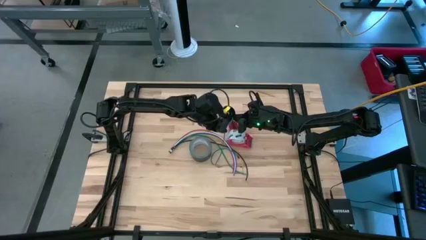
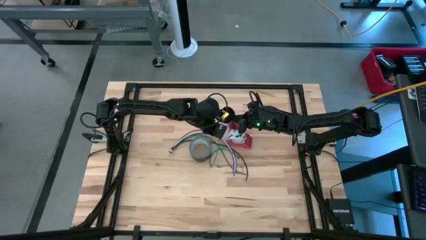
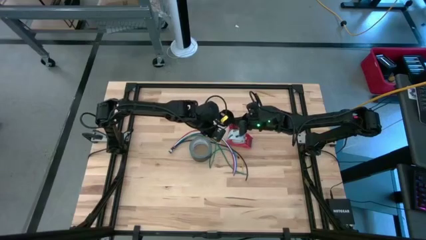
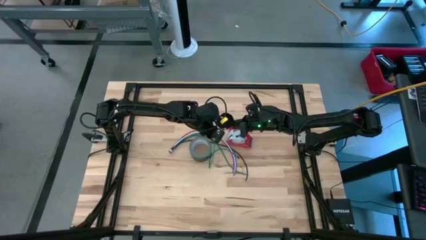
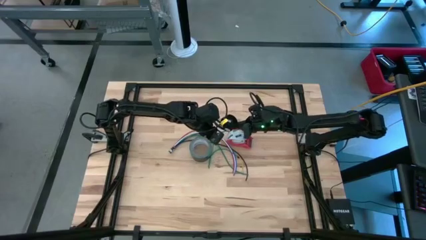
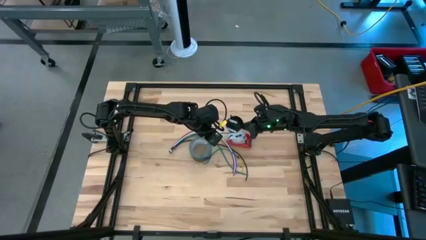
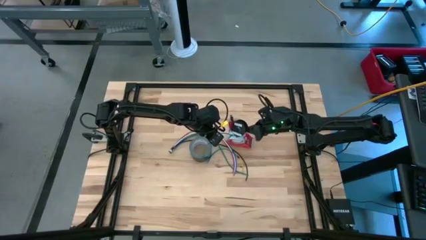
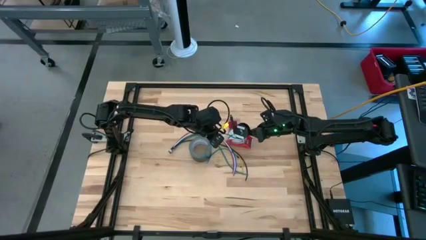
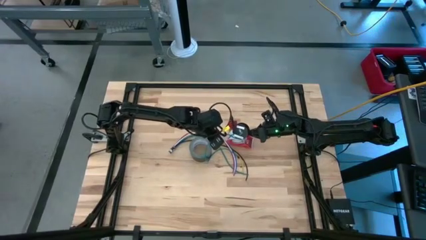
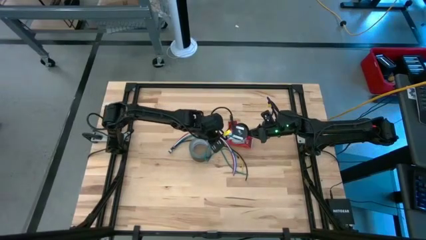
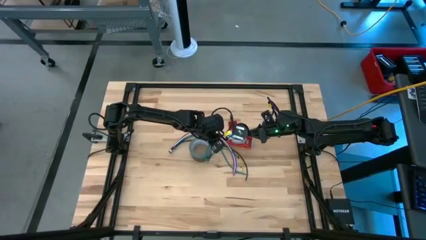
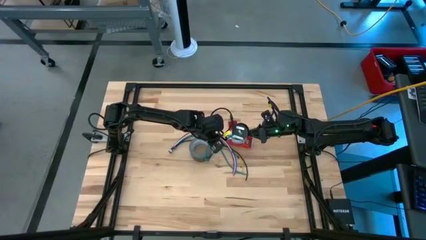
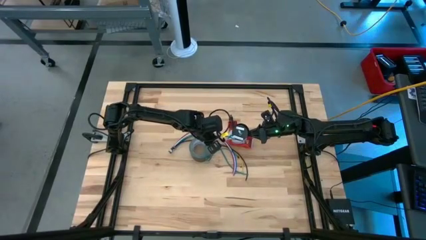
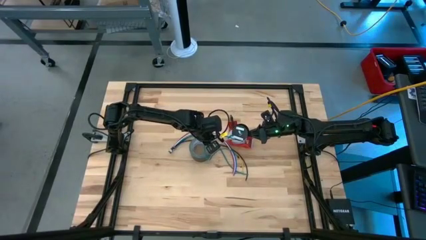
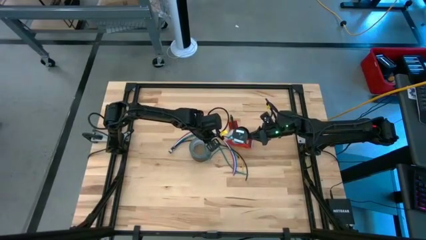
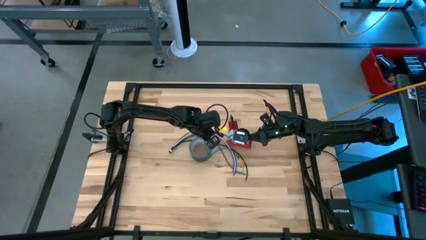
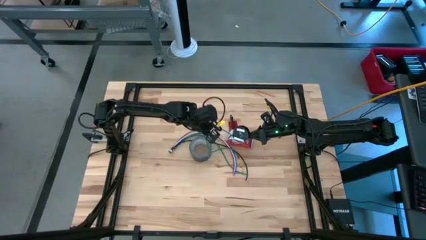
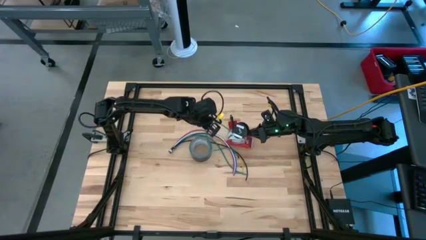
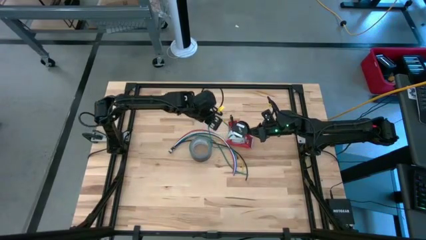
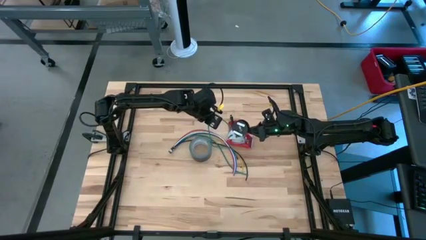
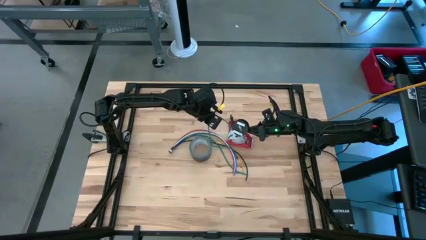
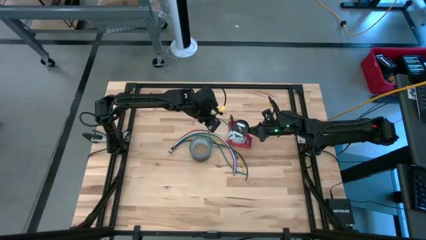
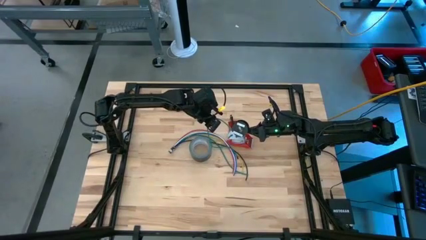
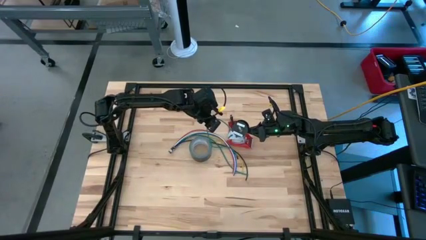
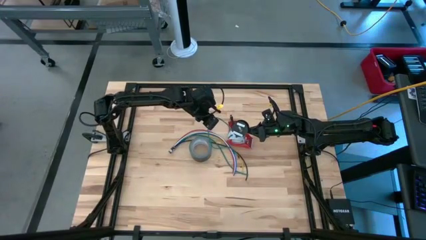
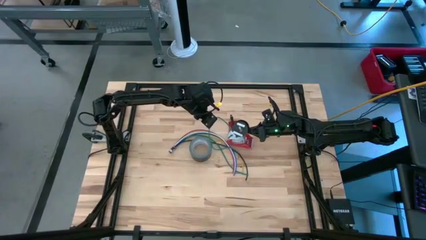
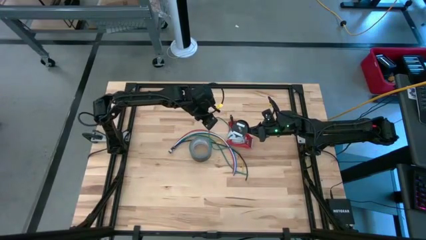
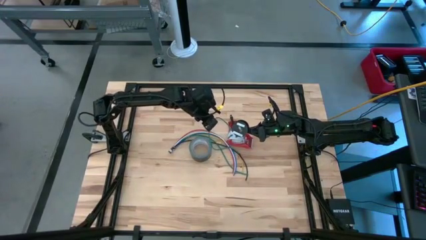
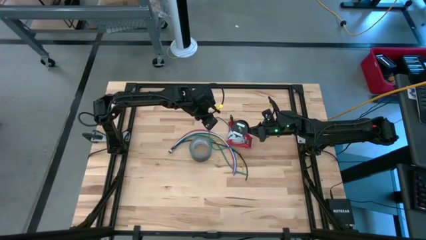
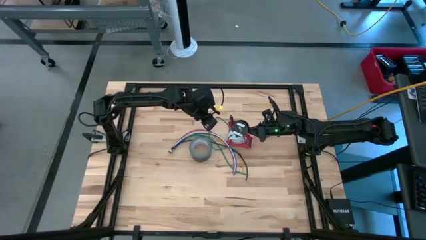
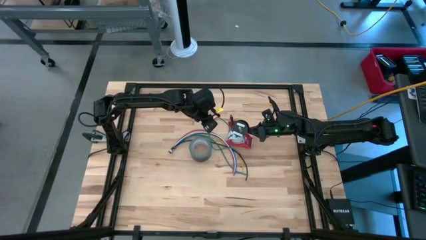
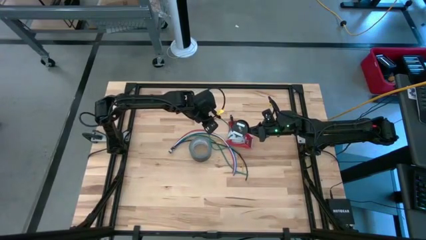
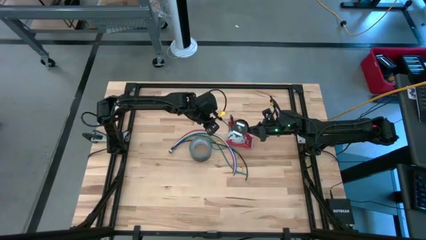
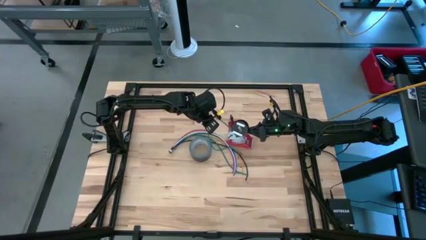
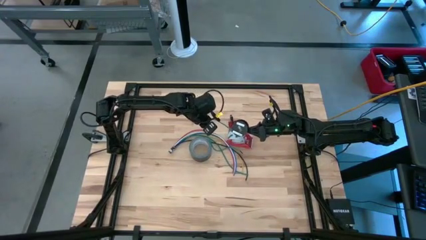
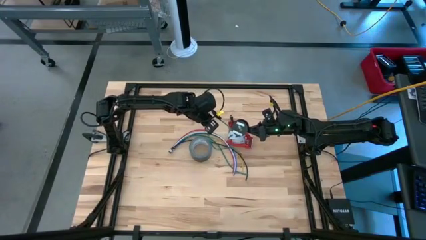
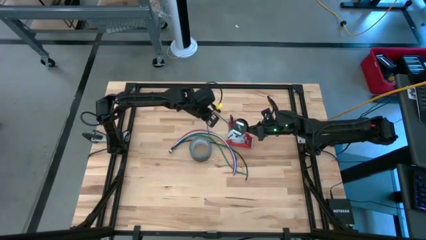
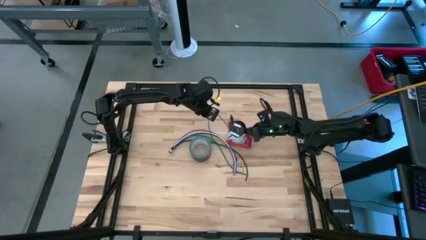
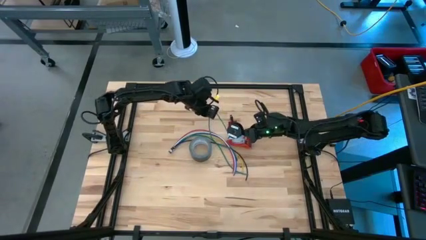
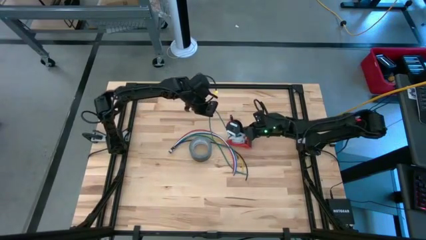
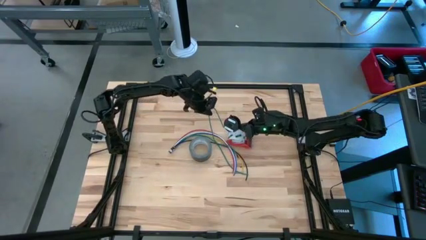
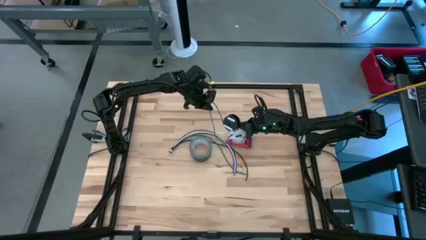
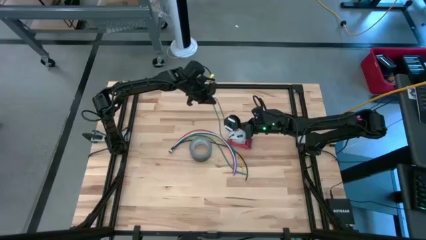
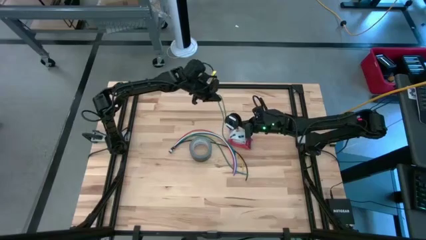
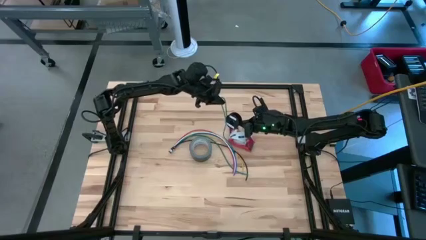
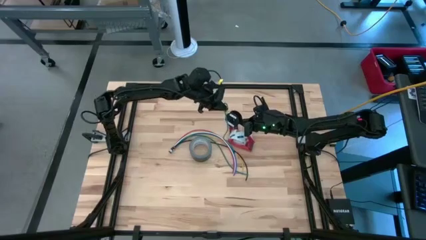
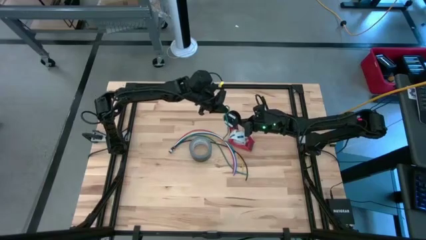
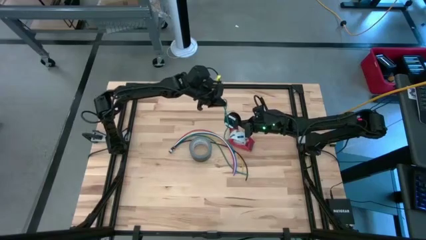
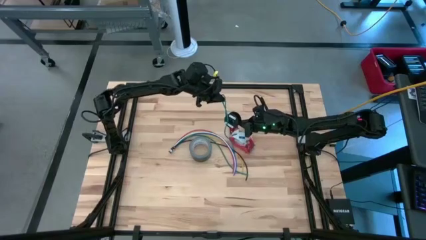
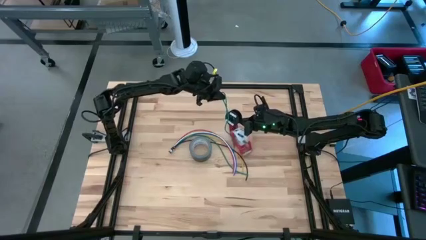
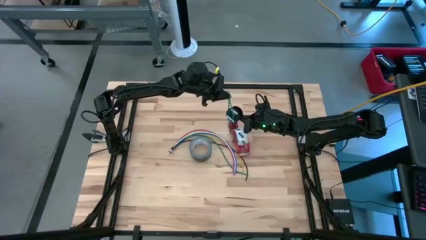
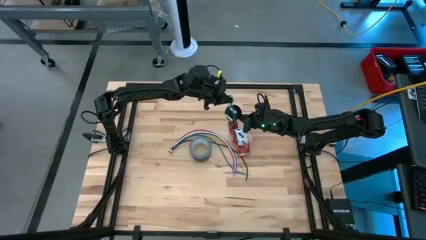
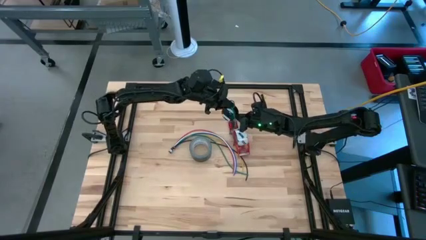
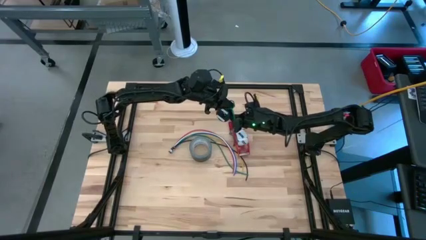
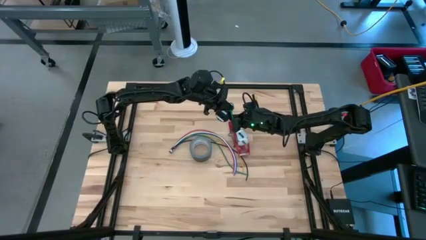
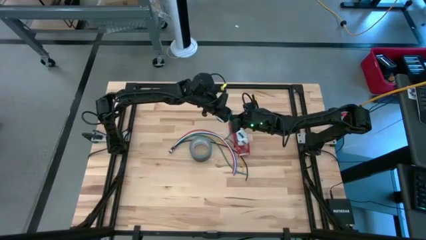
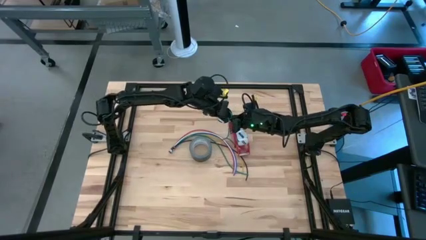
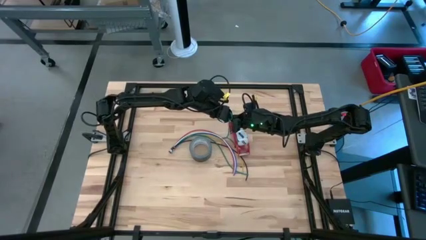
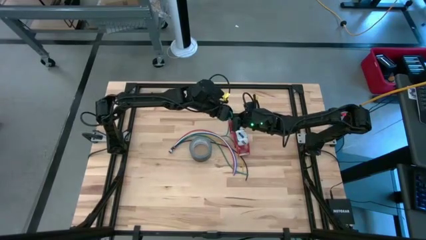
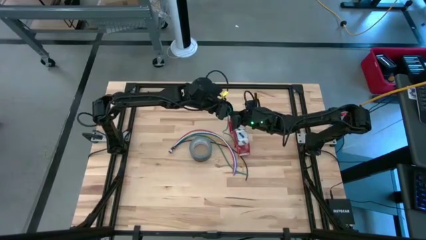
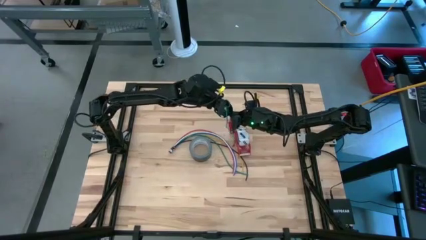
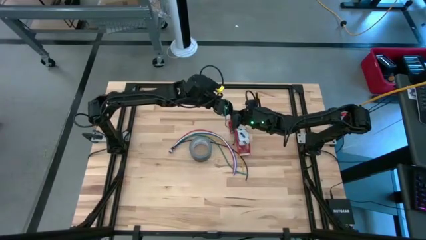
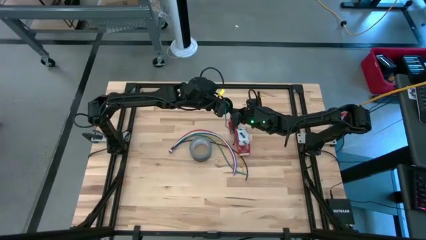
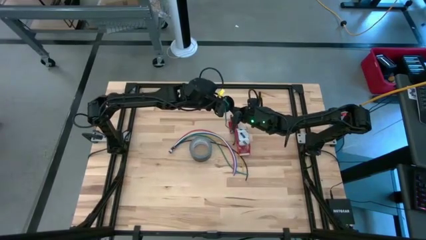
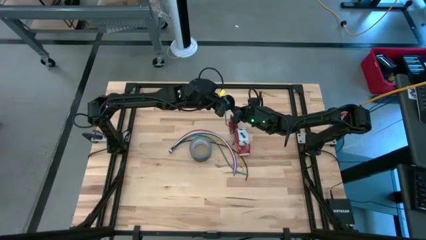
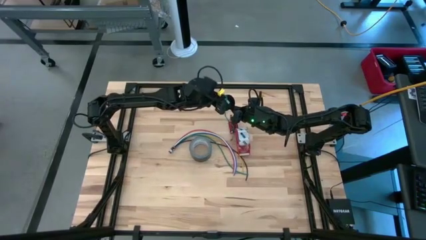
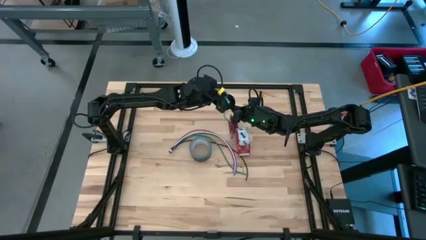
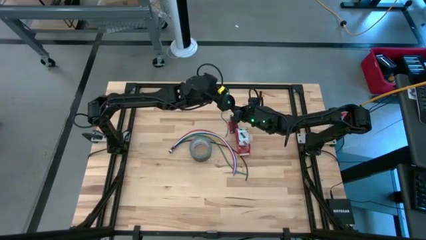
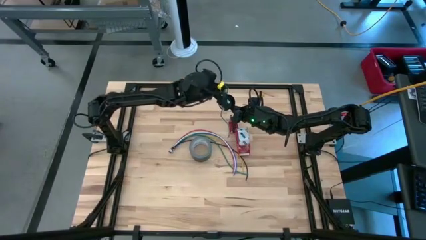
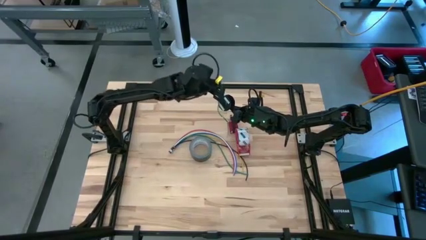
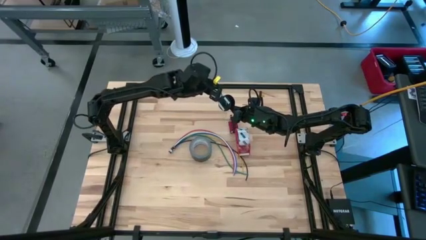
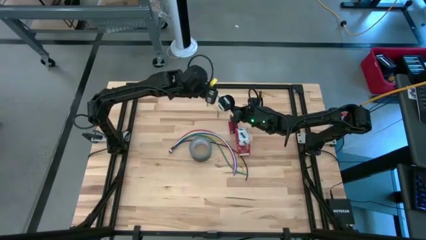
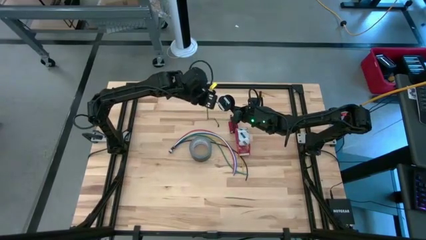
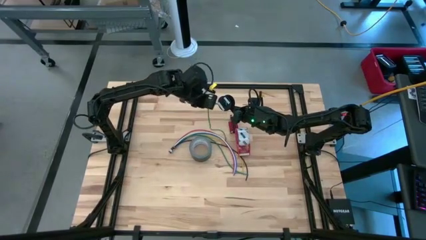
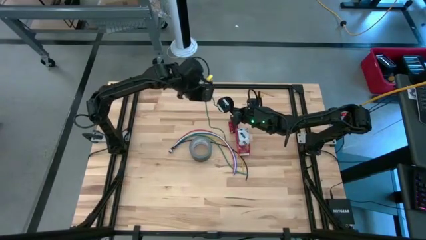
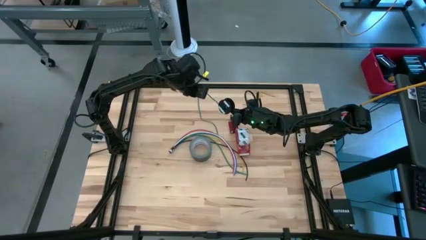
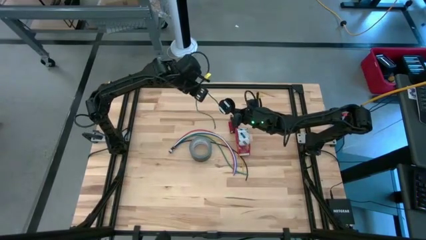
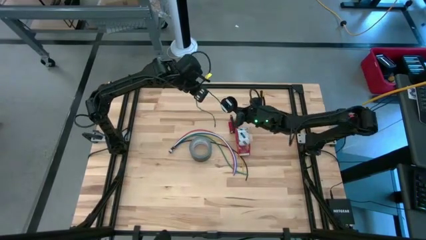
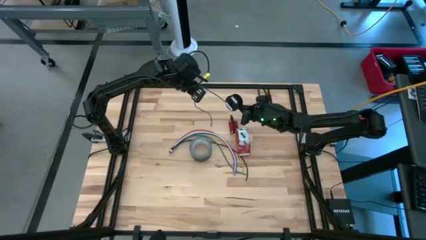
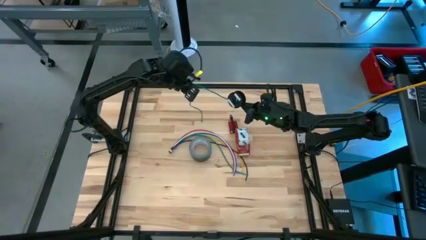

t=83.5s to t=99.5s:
Task: Coil cords
Coil the green wire into the spool

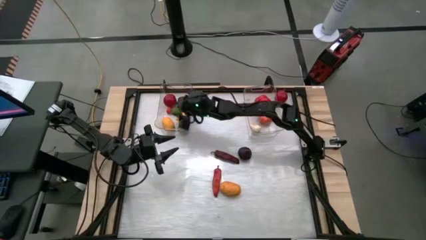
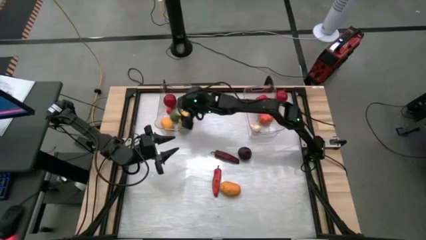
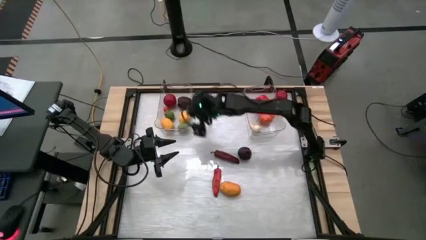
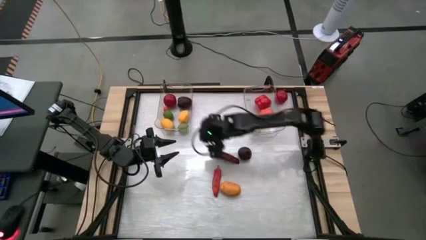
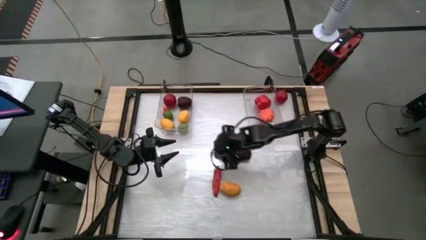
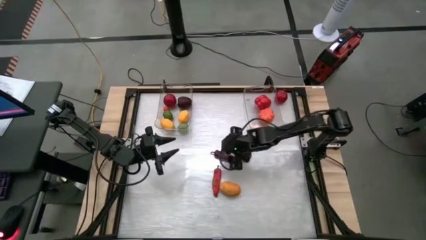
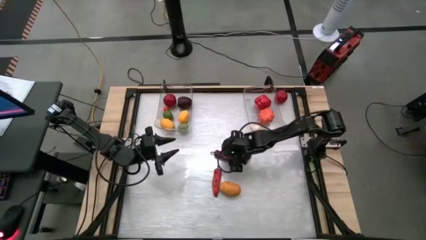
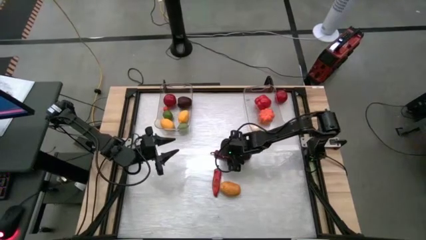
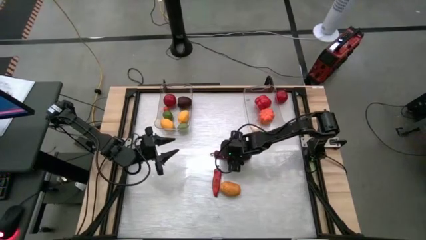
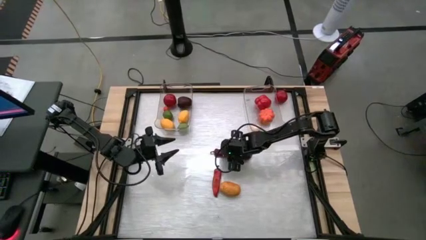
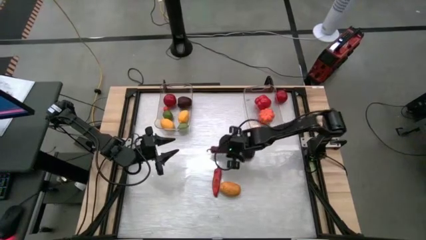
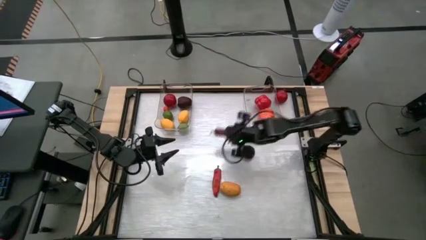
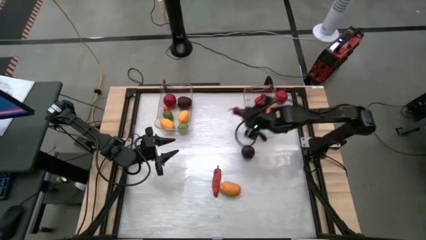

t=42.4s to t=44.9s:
Task: Sort produce into baskets
Put the top red chili pepper into the right transparent bin
